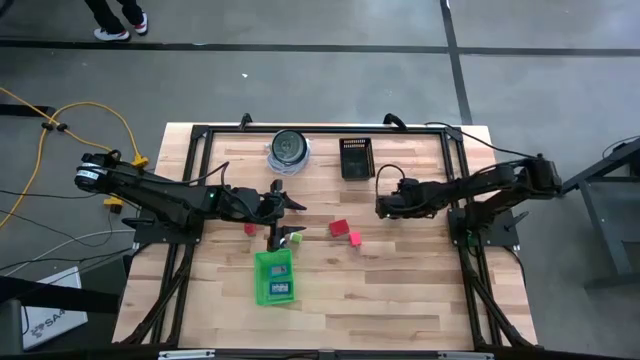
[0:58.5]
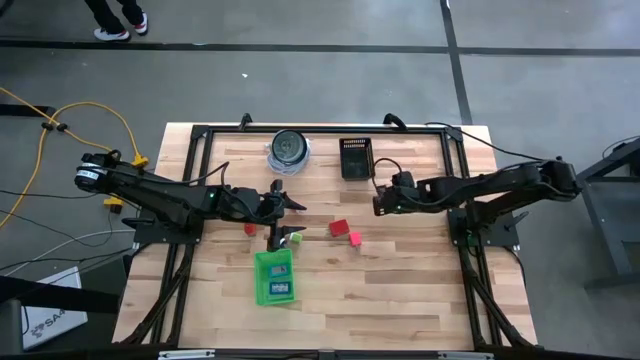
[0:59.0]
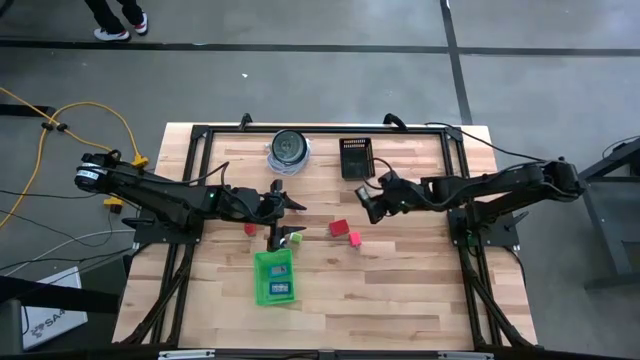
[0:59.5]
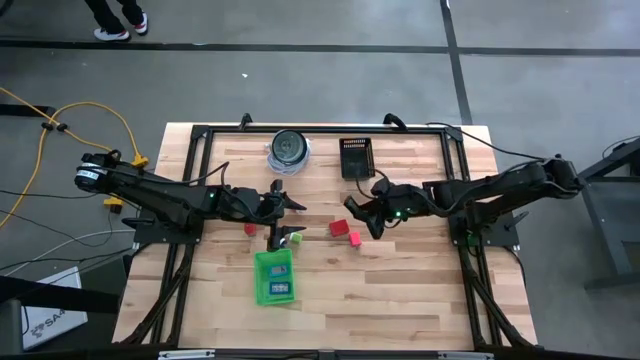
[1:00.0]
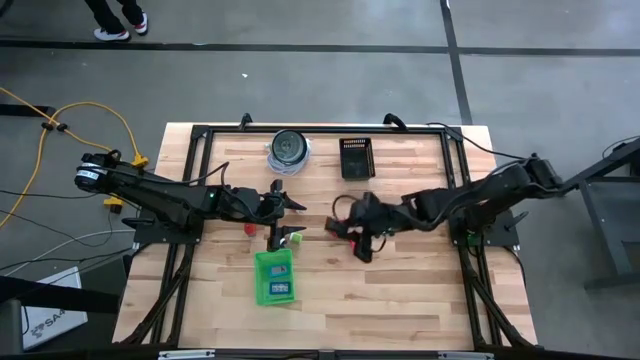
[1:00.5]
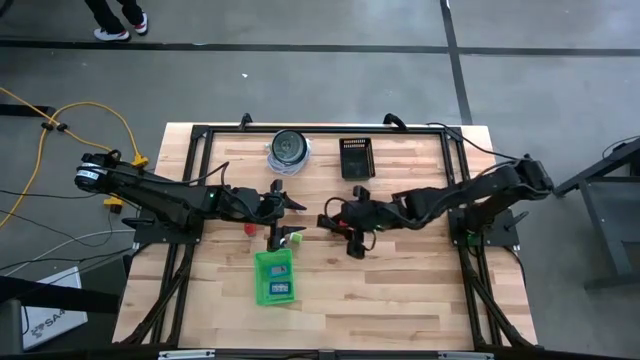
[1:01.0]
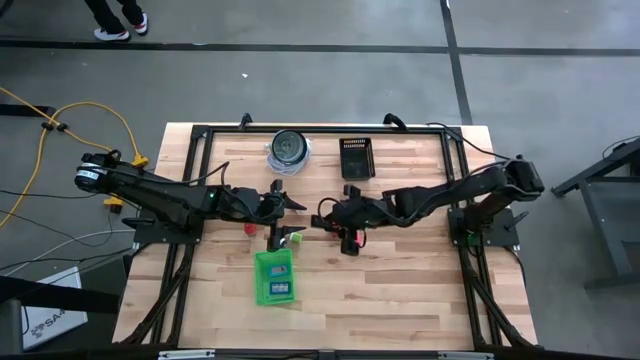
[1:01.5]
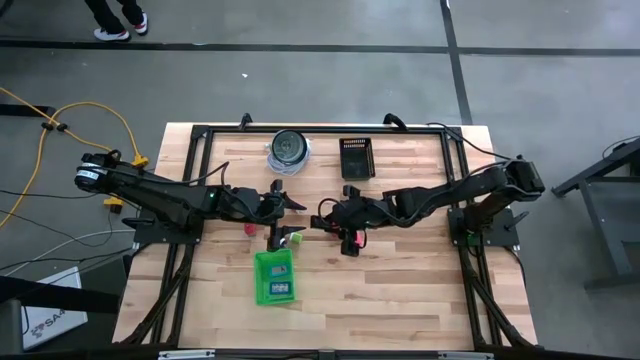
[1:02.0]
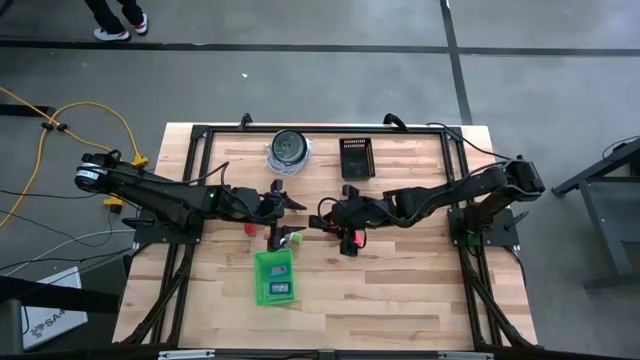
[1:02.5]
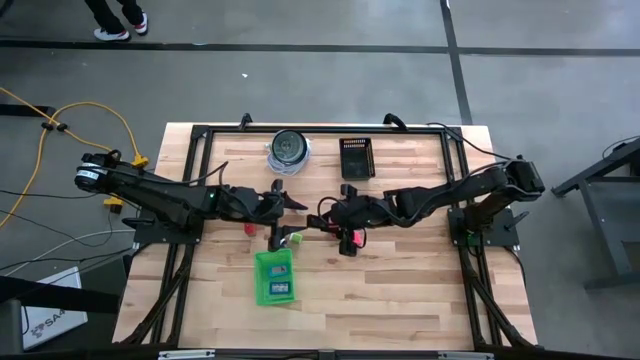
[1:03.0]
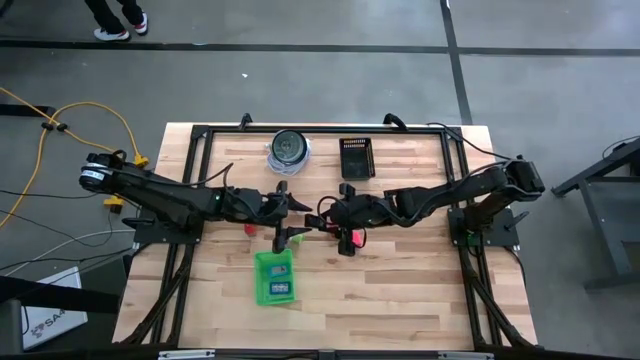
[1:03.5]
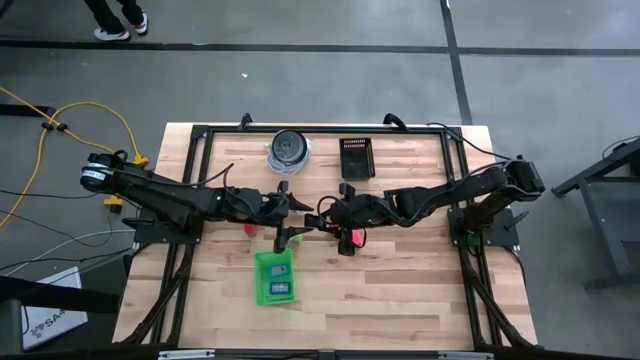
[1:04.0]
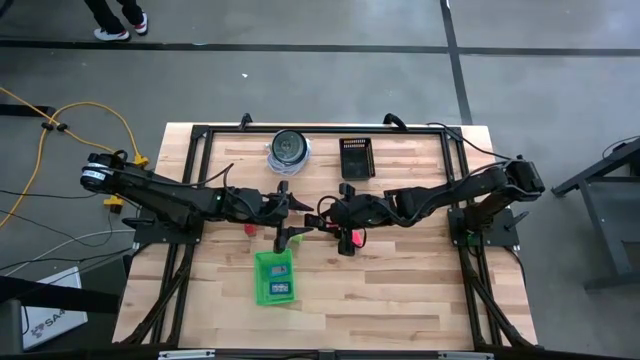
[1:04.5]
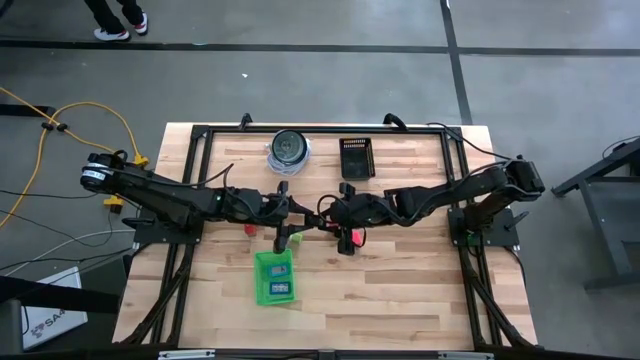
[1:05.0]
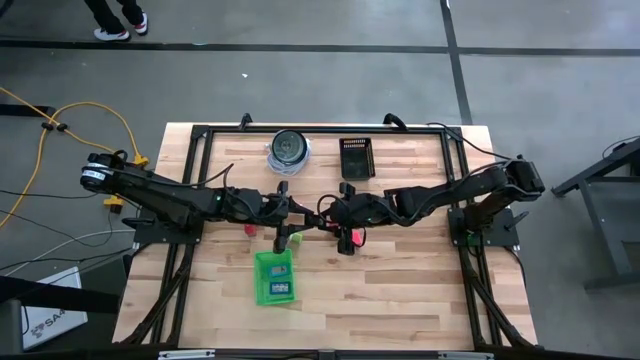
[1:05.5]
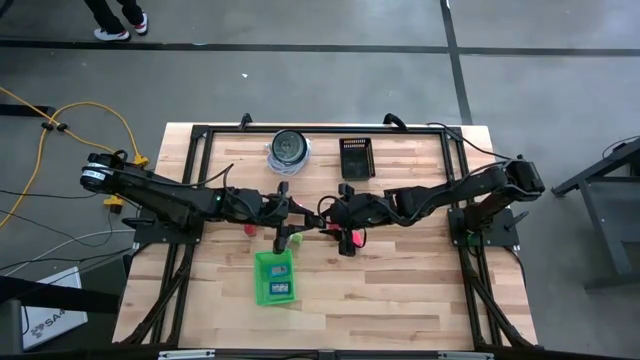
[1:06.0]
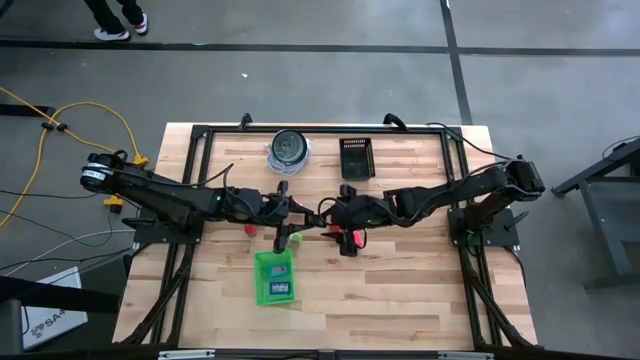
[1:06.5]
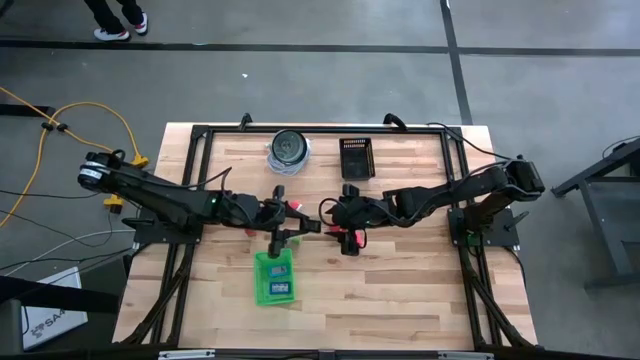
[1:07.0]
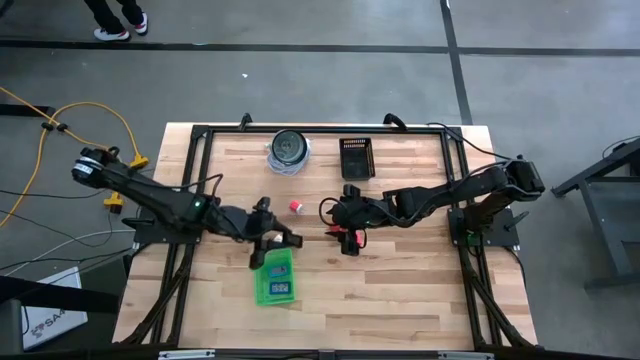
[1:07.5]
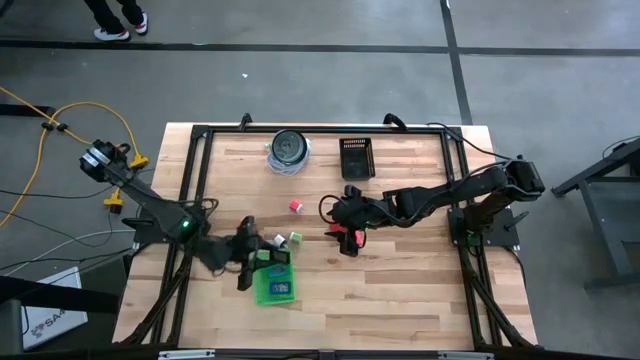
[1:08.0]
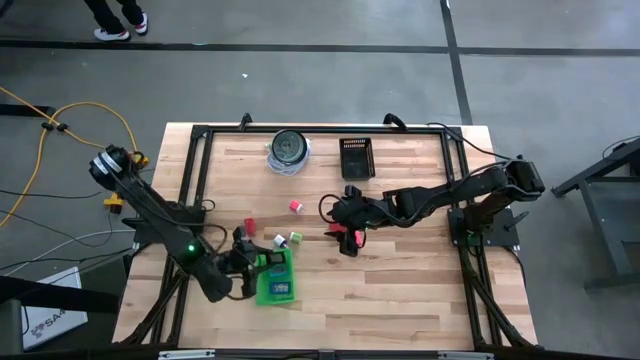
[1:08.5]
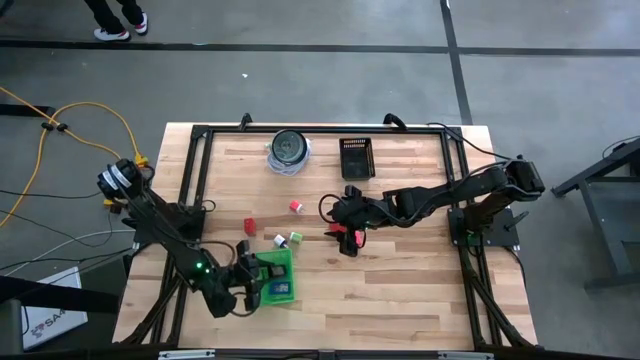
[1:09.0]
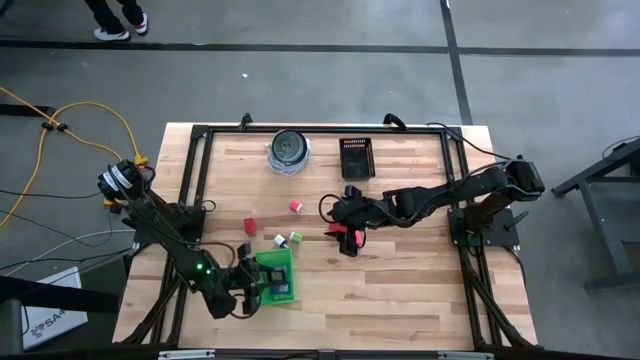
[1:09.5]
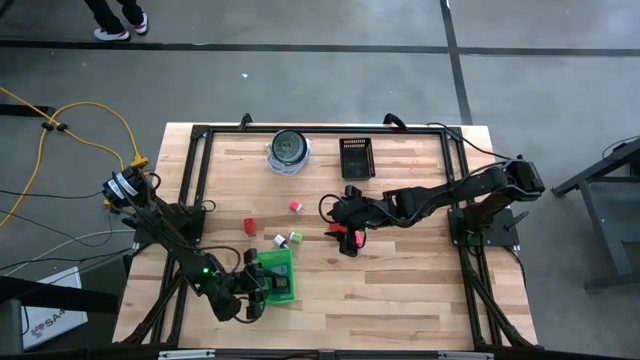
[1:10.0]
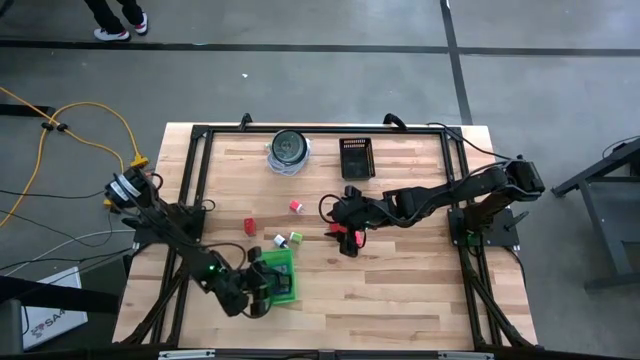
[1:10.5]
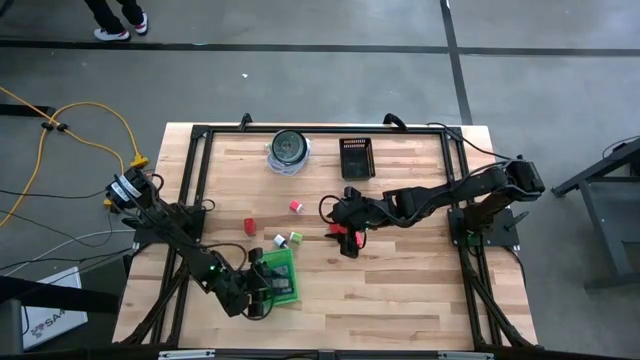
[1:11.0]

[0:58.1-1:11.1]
Task: Pick & Place Office items
Put the black digital clock into the green bin
